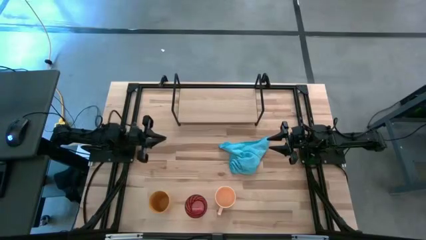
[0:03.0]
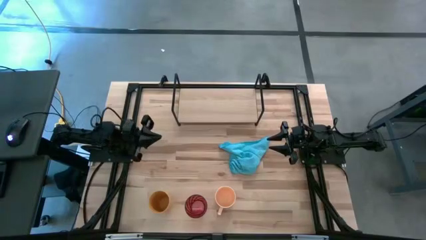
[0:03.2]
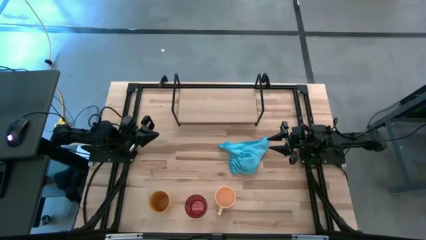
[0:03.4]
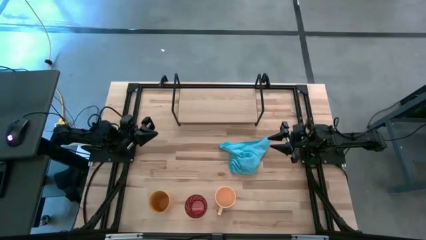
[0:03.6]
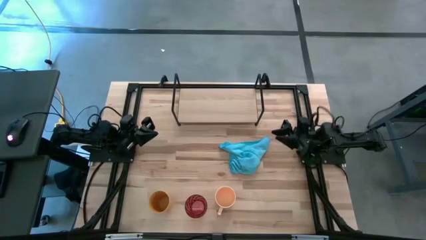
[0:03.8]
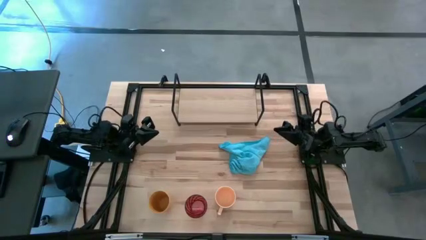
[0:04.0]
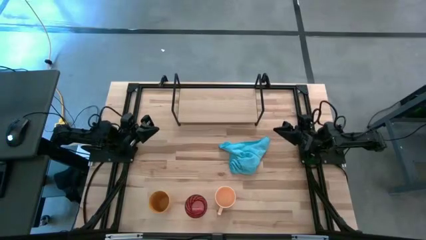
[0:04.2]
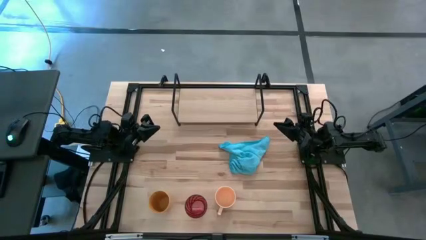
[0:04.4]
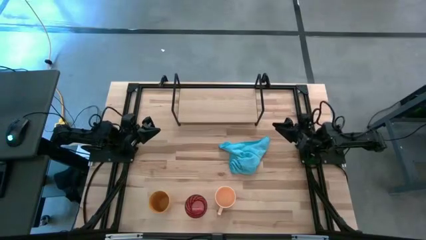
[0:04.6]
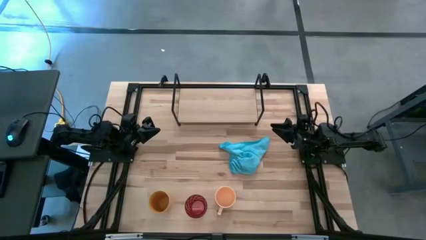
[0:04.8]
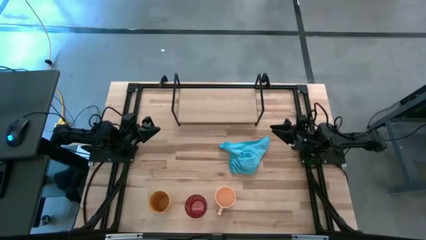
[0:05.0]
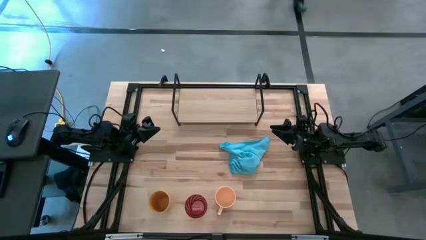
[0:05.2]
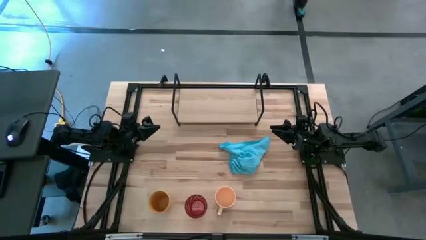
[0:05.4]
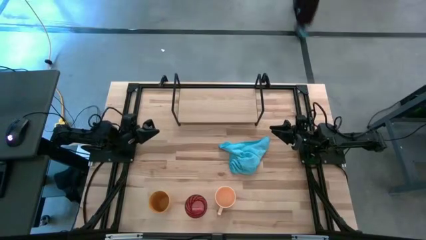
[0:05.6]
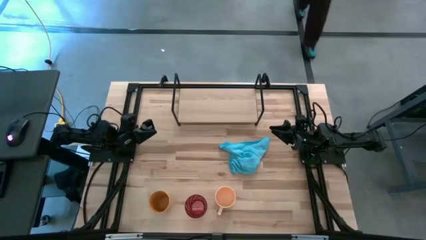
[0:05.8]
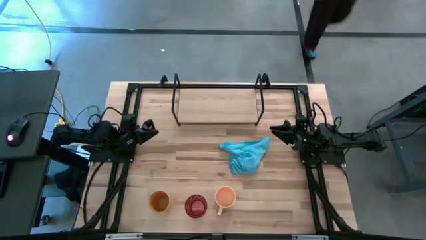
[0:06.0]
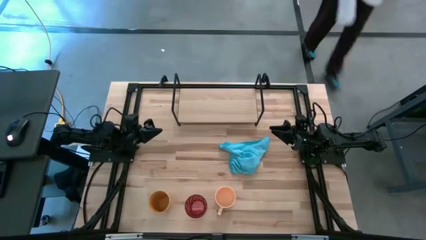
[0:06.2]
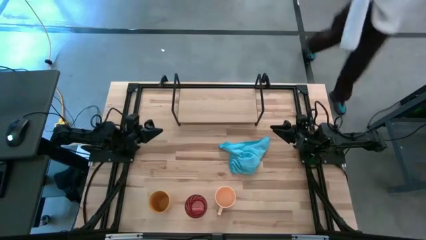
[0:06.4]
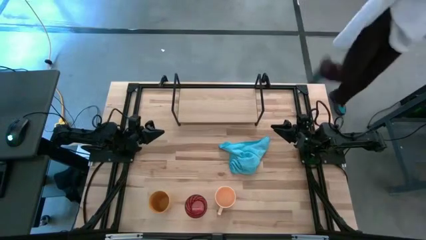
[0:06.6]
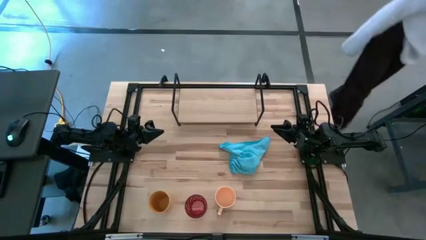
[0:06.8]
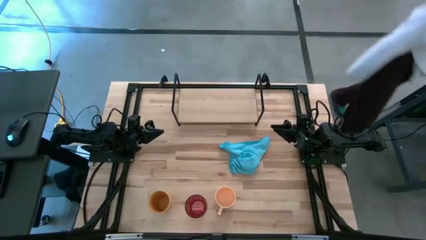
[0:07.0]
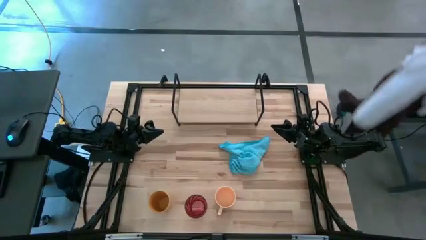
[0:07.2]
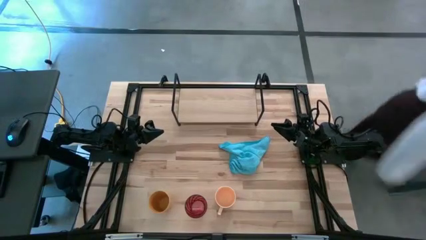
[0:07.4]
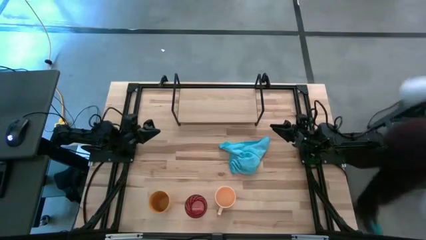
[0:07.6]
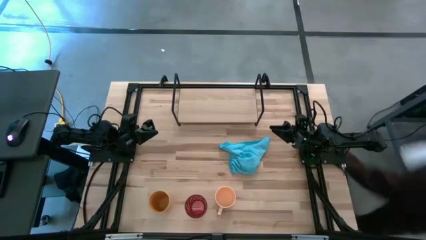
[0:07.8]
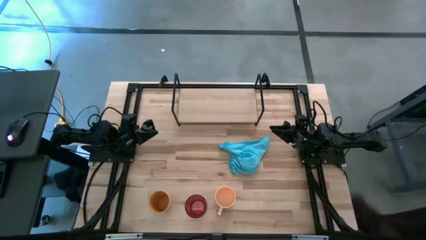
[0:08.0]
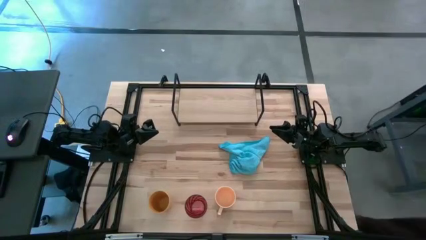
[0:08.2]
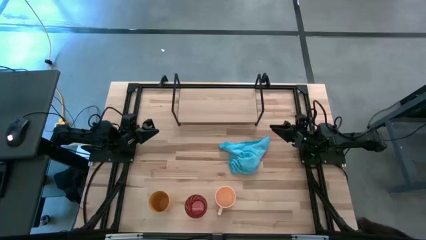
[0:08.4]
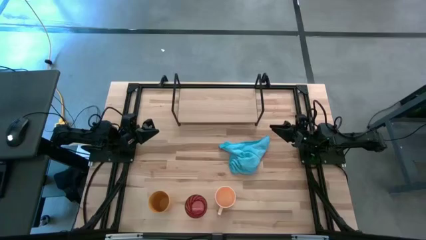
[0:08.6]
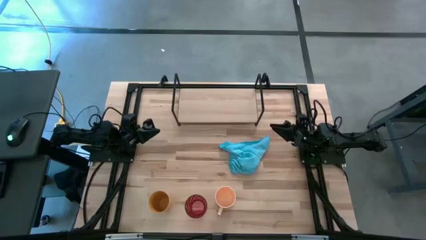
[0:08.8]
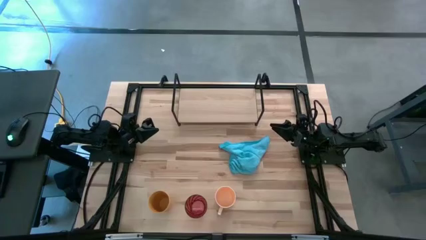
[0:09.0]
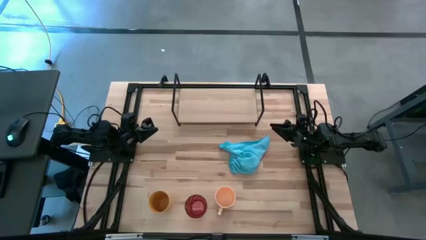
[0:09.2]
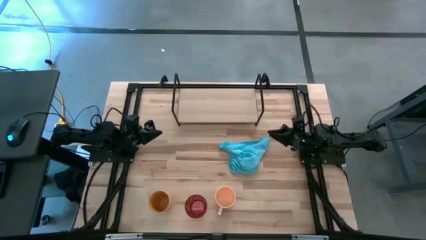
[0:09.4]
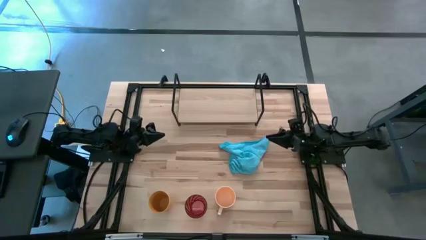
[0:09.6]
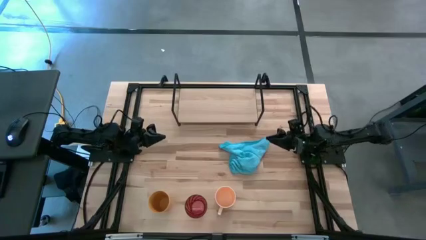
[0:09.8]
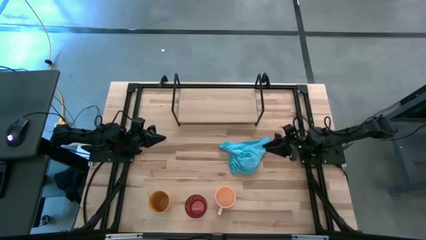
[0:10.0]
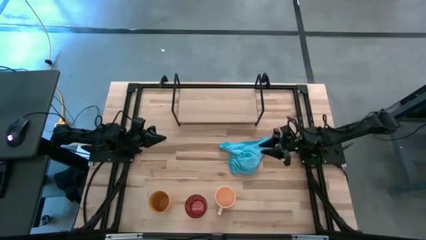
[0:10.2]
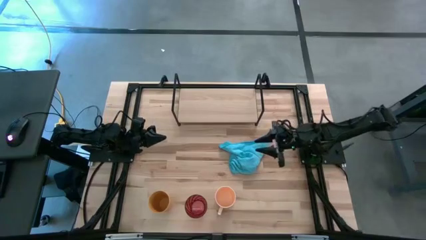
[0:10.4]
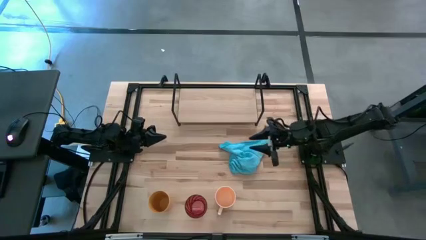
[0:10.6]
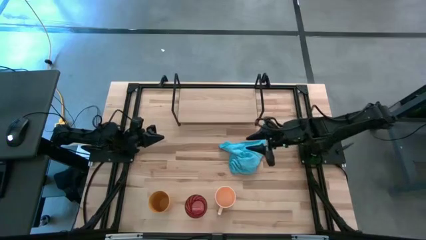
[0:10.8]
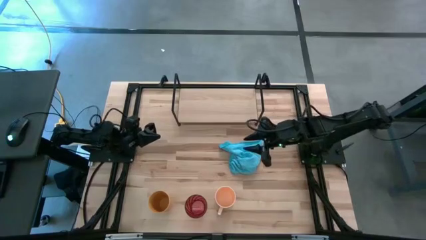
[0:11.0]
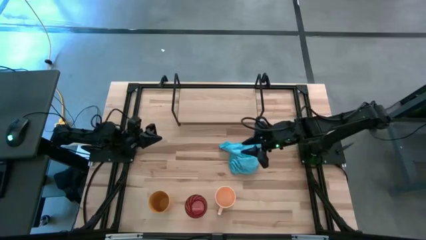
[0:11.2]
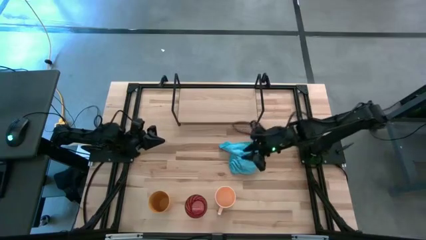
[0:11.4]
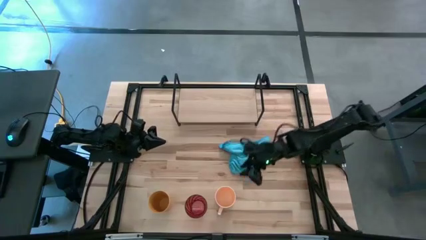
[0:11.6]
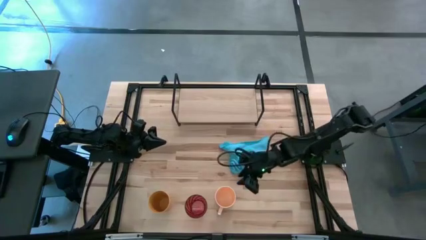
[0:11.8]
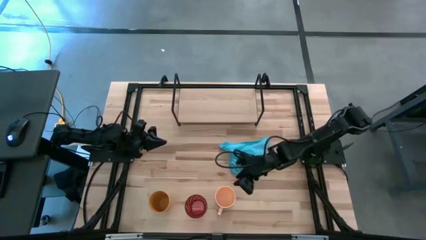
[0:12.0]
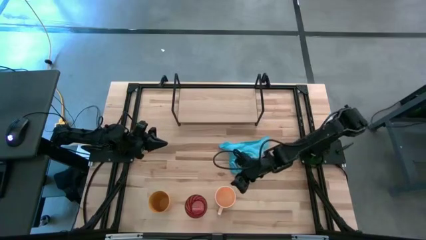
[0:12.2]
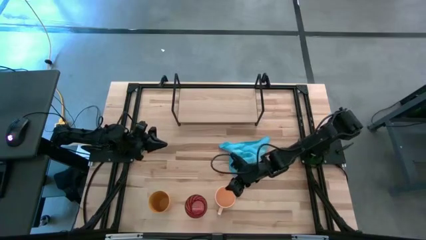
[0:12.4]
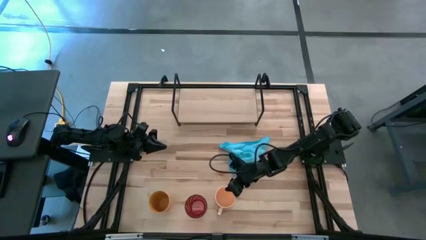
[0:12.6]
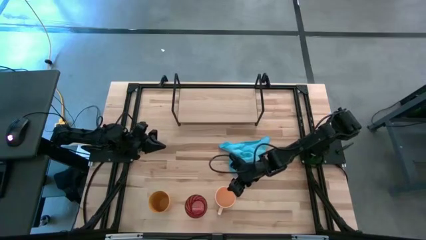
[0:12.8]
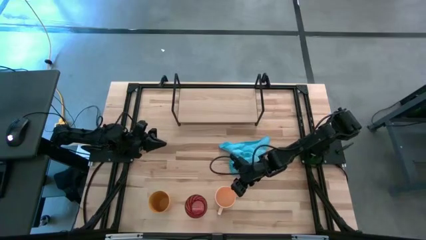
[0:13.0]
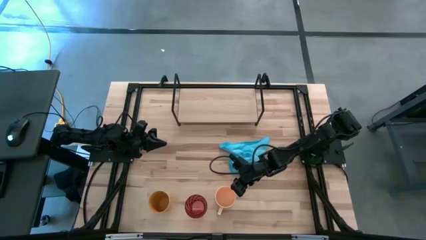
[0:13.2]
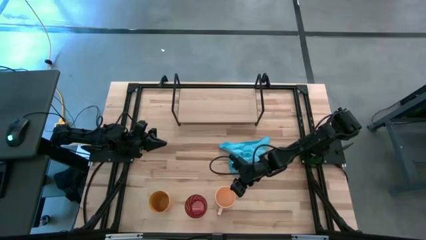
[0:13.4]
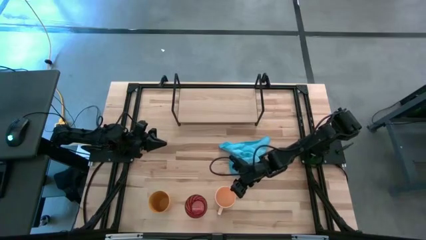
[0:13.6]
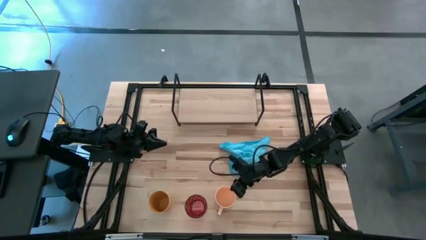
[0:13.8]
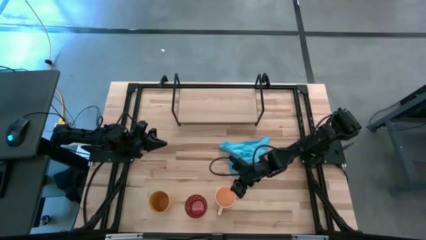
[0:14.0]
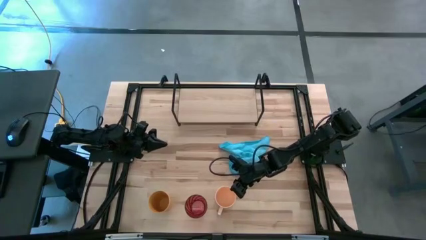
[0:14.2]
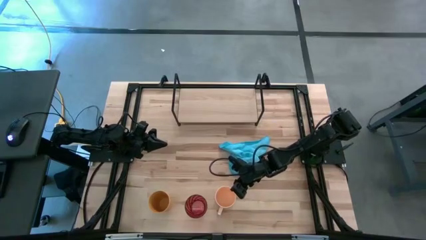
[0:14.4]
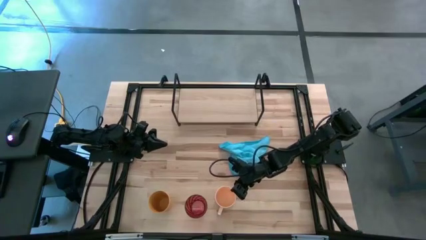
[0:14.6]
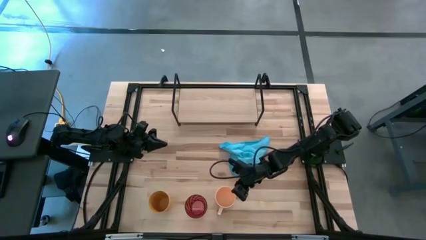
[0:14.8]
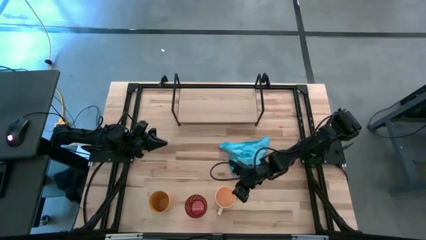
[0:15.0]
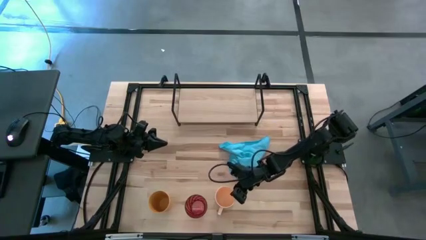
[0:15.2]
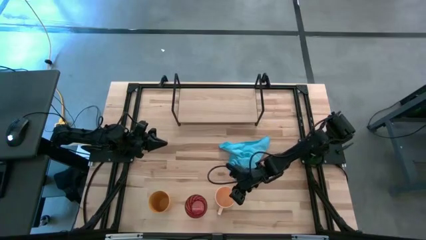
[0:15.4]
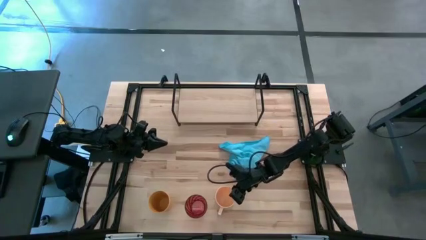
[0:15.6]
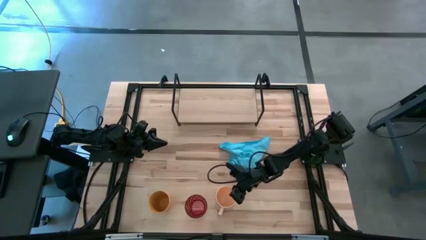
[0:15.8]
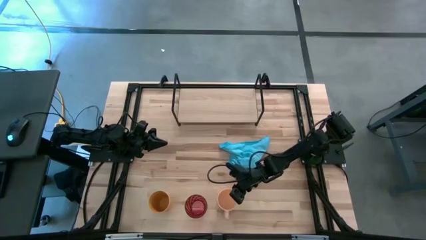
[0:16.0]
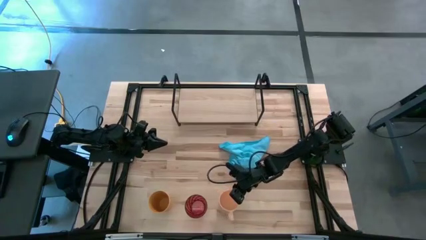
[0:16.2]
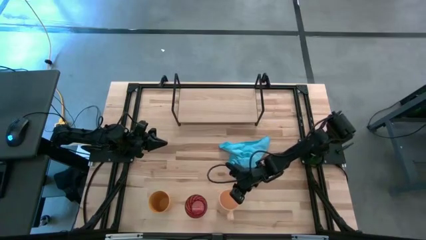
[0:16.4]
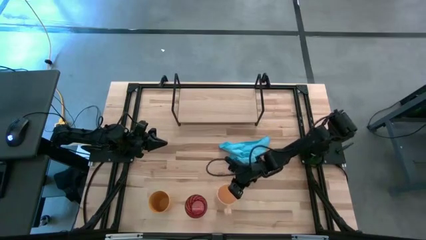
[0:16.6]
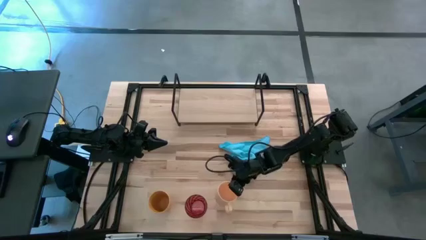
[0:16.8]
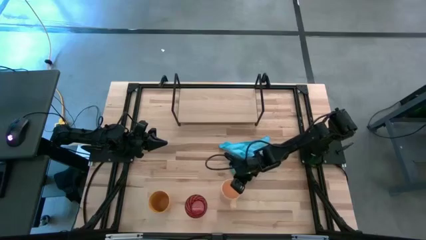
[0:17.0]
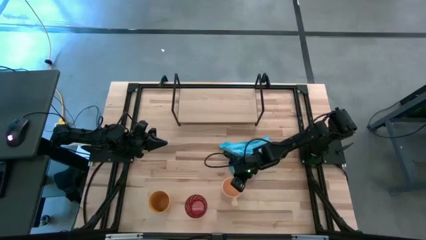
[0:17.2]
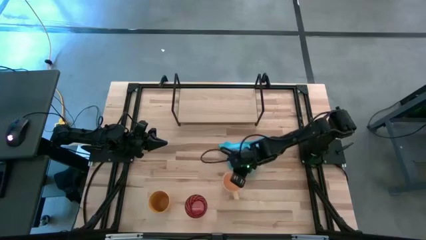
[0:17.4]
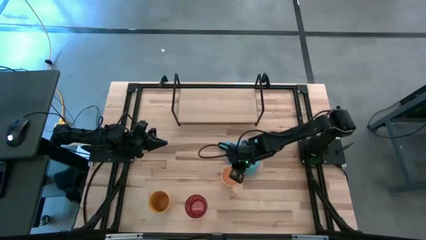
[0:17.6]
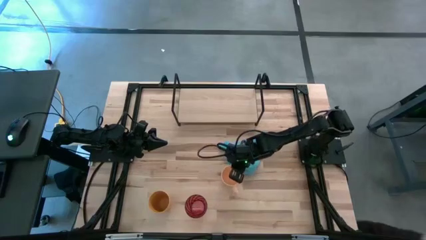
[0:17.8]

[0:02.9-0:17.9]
Task: Stack small to large cups/mugs on shelf
Put the orange mug on the shelf
